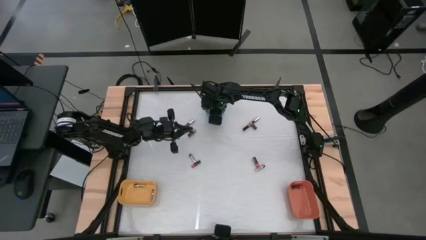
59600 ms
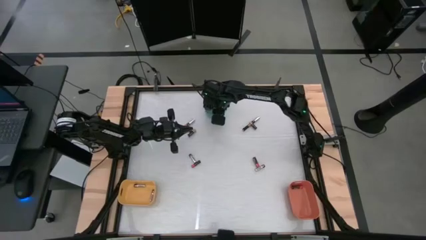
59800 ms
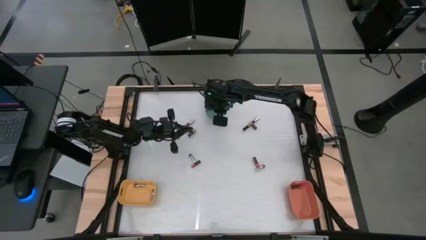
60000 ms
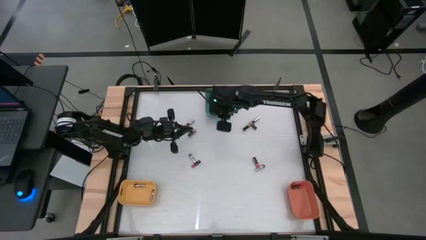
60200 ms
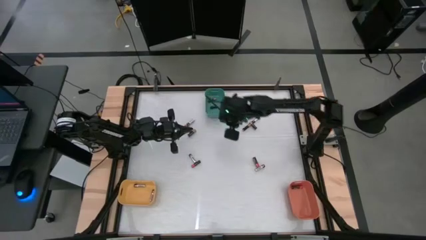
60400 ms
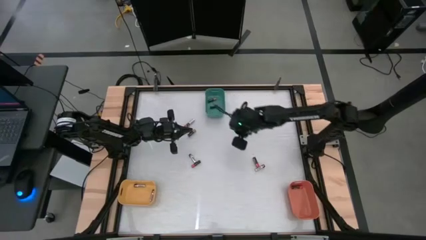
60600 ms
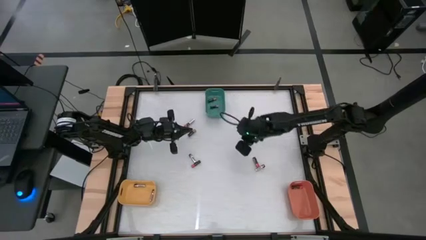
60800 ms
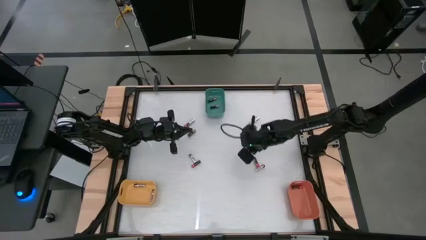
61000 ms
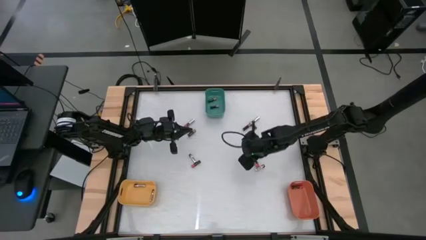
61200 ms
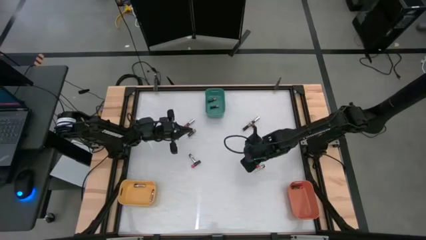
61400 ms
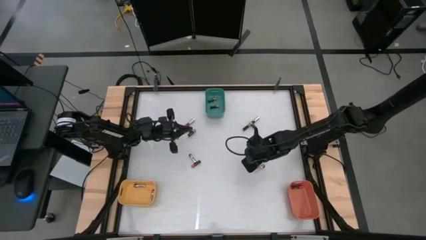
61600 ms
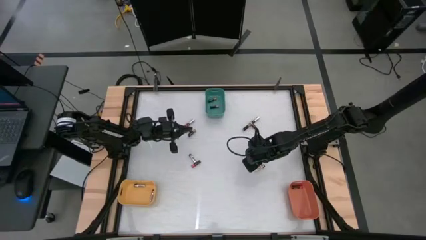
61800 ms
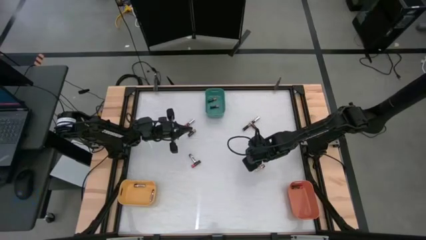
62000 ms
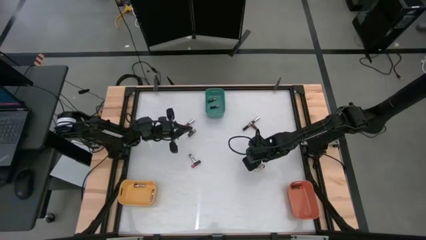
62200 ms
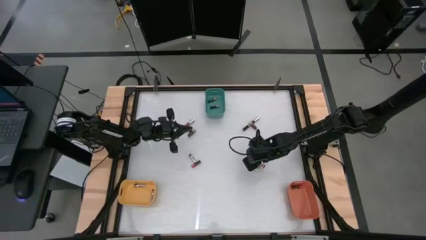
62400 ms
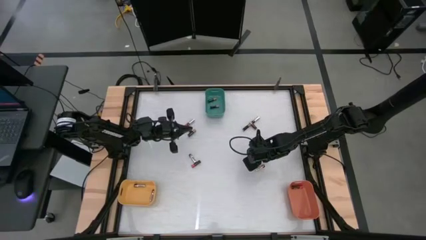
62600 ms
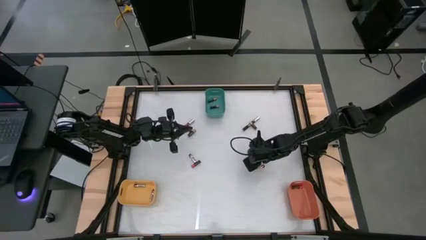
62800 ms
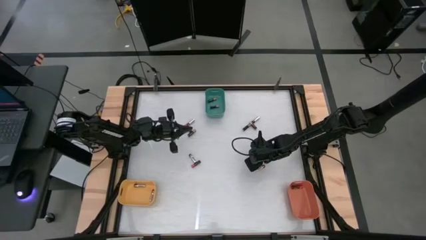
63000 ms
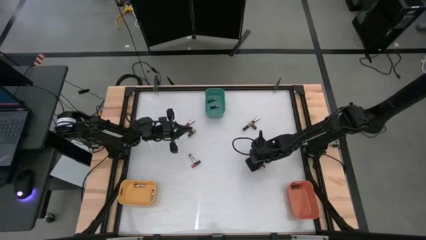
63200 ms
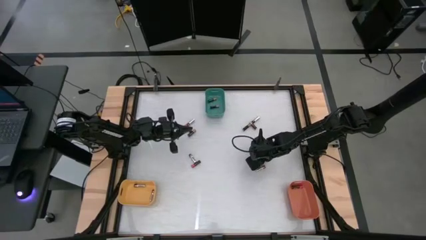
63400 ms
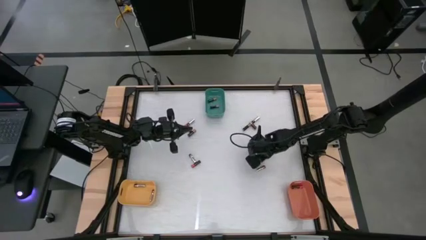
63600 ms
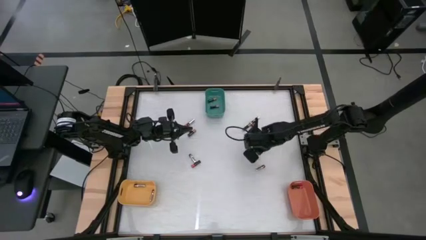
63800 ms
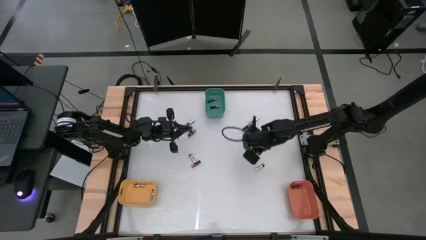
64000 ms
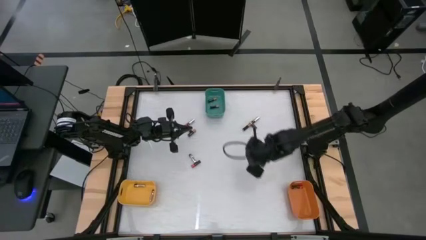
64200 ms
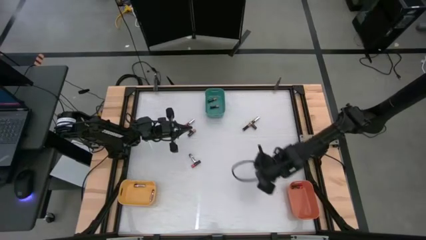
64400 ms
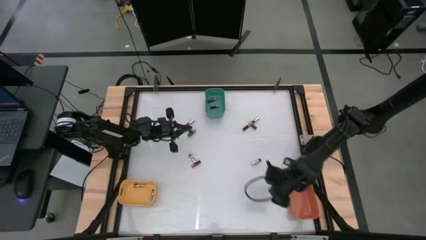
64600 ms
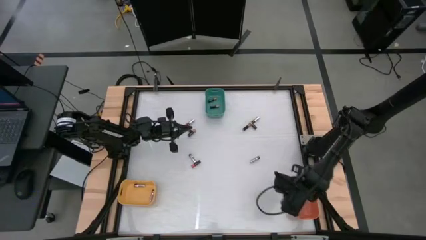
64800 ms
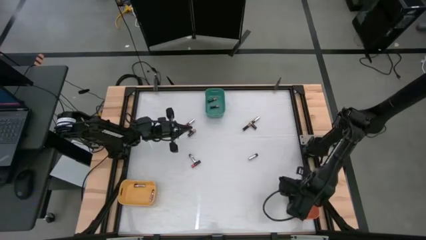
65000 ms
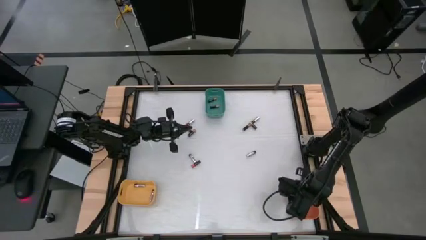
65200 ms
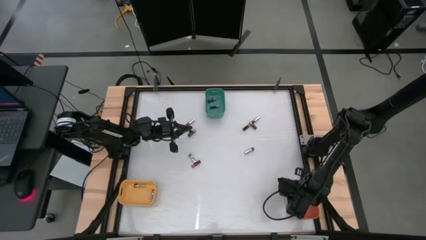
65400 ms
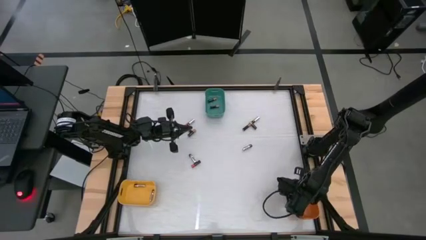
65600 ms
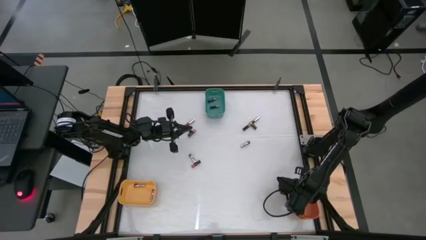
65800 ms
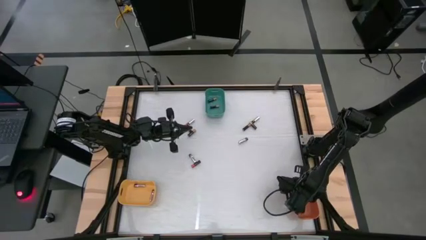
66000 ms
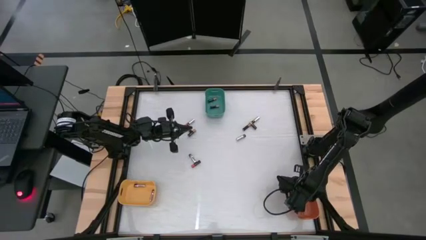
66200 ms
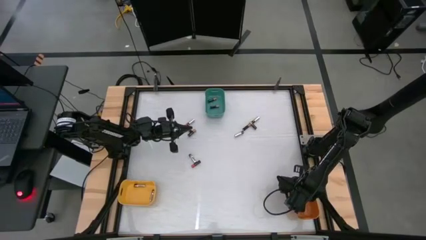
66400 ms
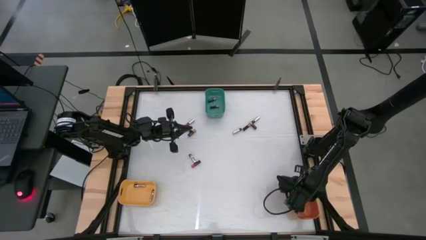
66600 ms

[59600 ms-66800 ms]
Task: Sort batteries
Put the red battery into the orange bin

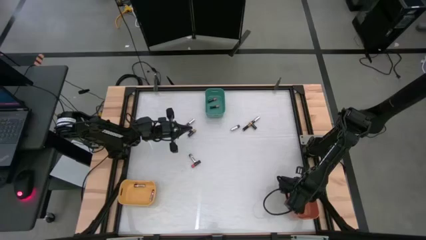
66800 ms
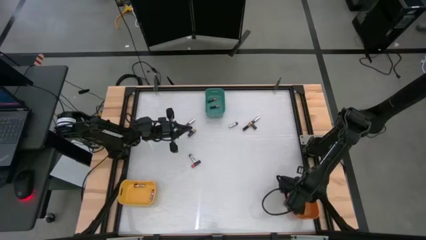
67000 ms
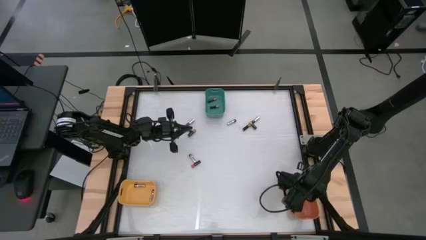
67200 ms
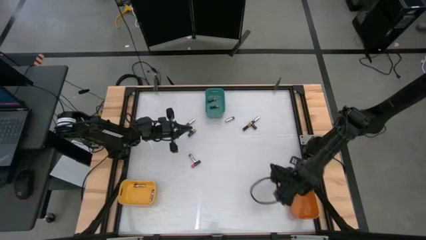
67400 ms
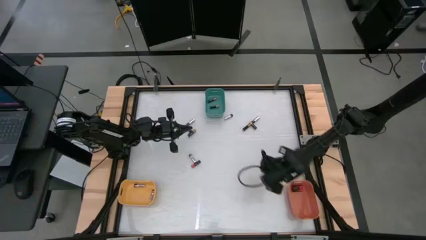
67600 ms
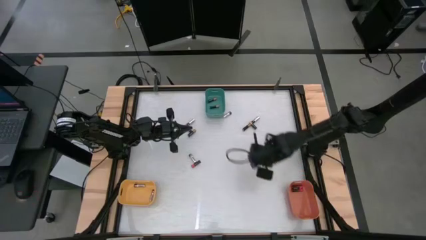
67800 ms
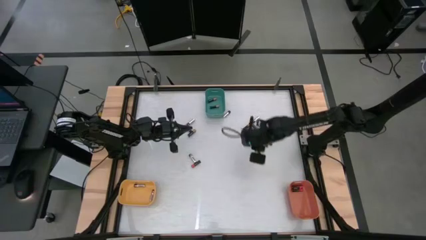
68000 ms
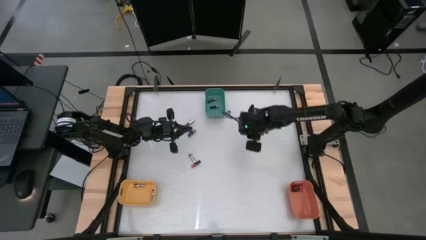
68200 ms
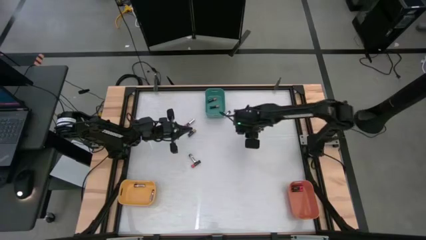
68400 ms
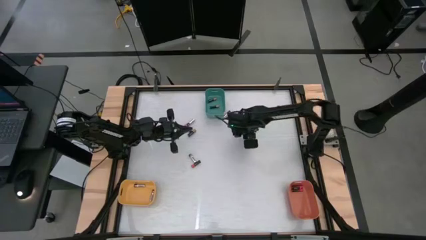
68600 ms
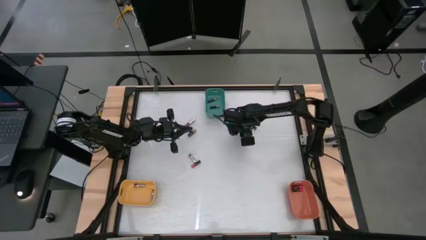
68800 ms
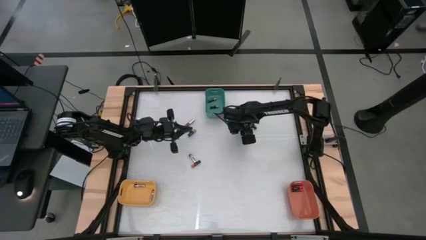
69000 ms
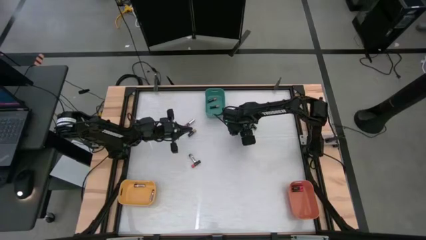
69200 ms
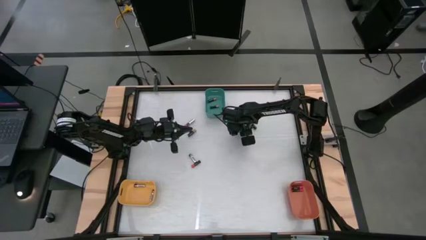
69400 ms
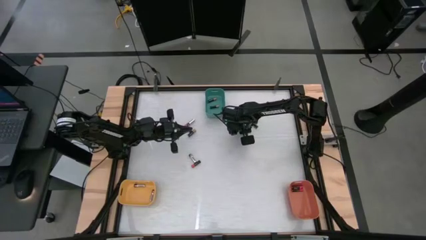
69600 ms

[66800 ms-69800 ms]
Put the brown battery into the green bin

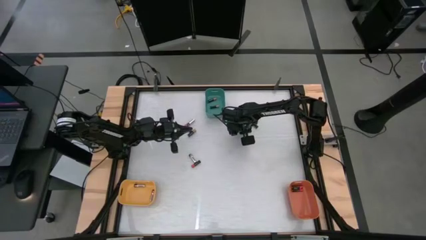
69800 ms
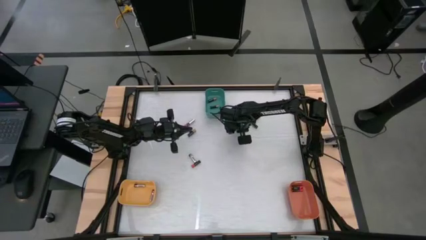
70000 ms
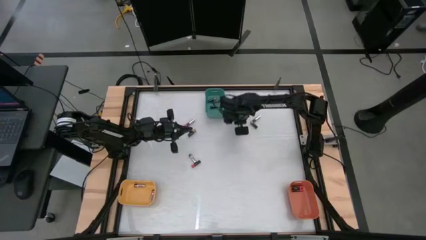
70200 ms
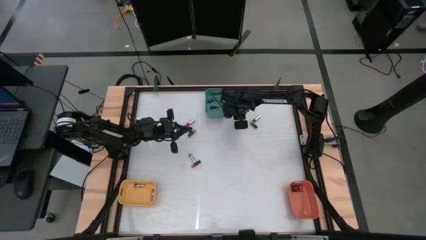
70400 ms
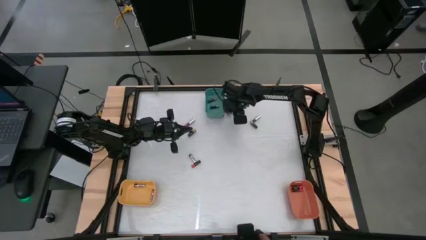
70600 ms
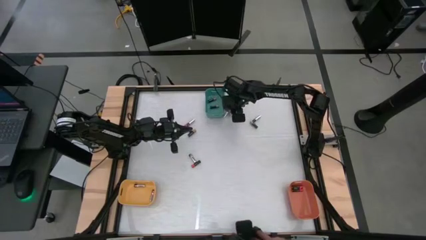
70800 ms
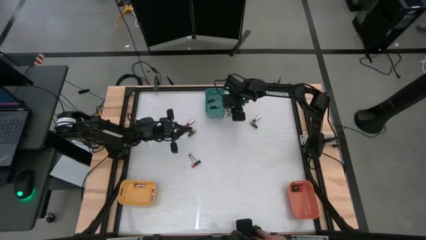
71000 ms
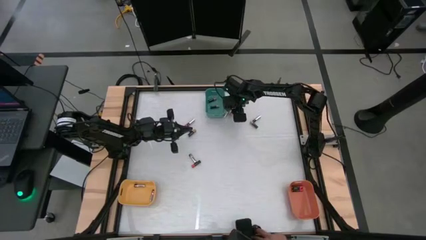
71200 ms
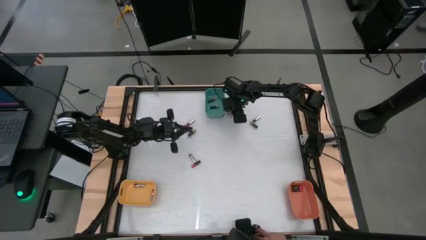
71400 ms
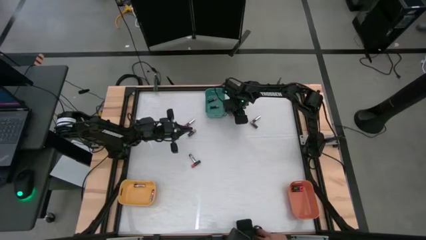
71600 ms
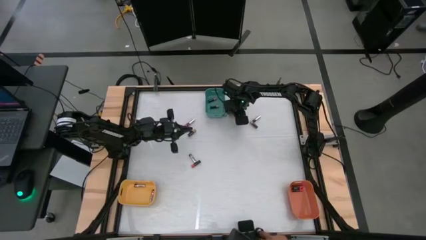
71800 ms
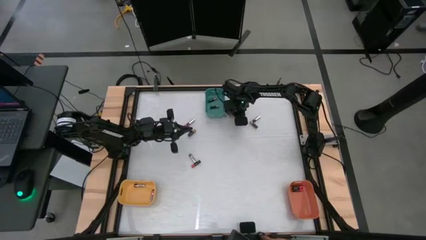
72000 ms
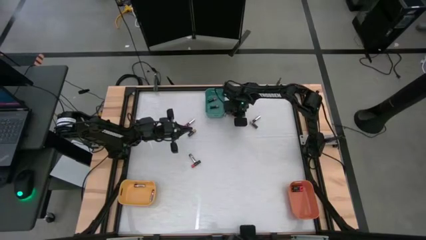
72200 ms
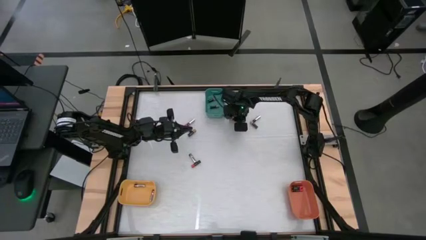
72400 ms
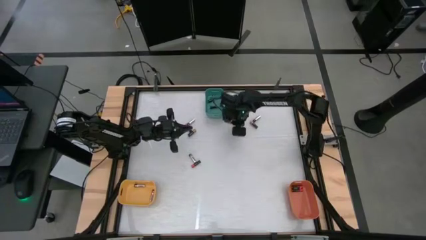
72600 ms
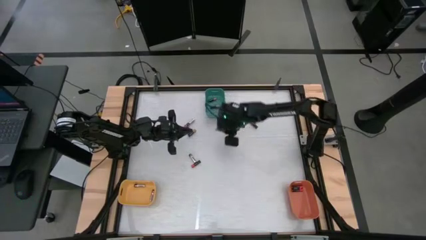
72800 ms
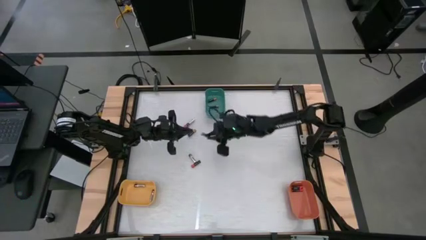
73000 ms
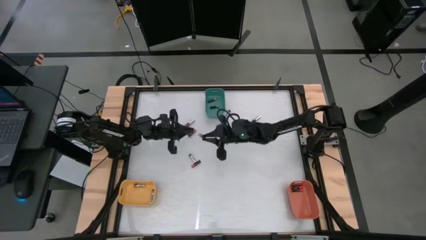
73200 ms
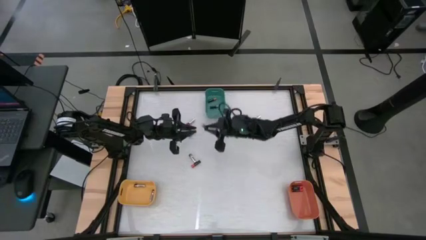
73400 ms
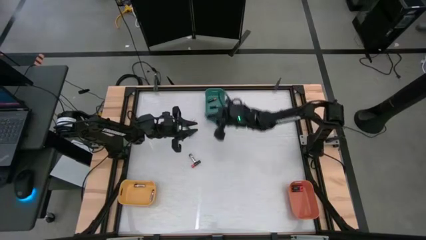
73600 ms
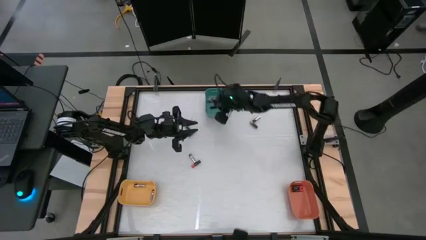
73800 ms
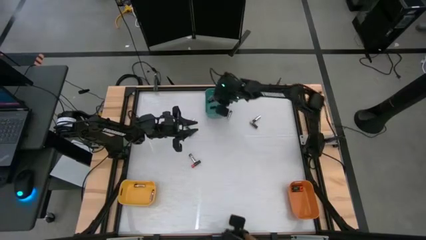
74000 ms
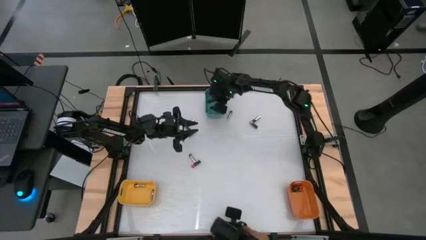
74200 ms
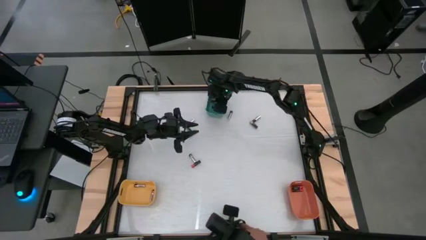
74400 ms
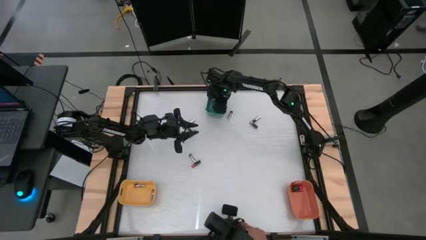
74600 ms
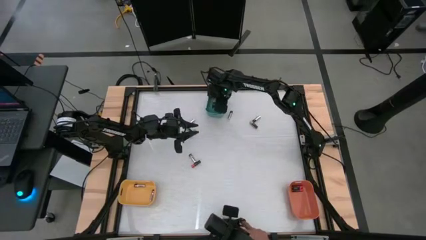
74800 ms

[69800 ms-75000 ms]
Put the brown battery into the green bin
